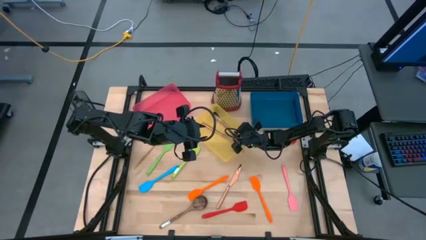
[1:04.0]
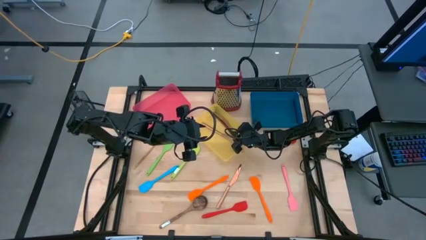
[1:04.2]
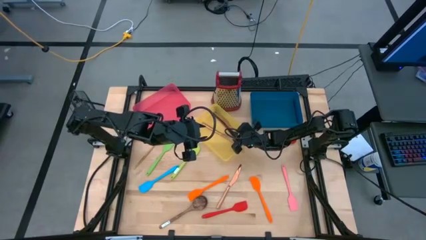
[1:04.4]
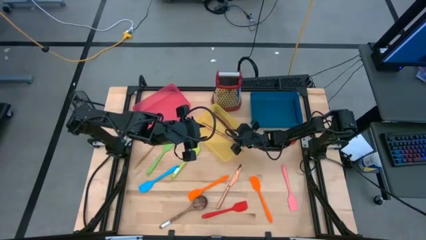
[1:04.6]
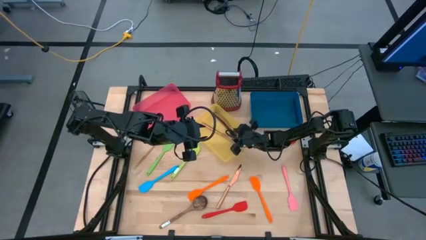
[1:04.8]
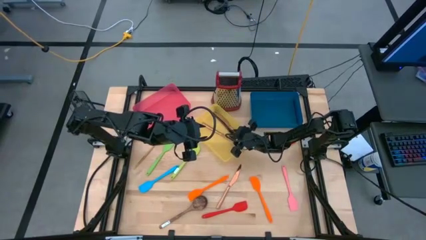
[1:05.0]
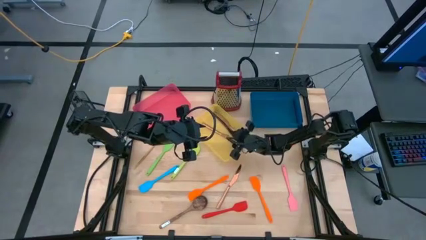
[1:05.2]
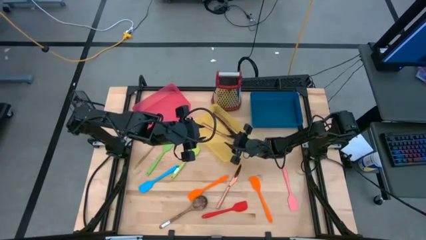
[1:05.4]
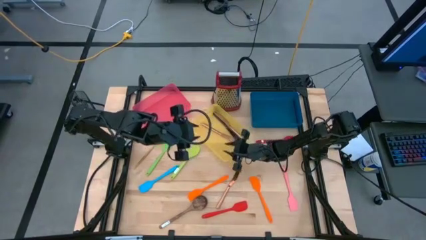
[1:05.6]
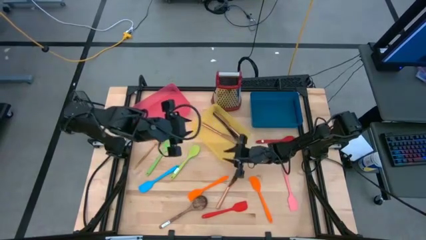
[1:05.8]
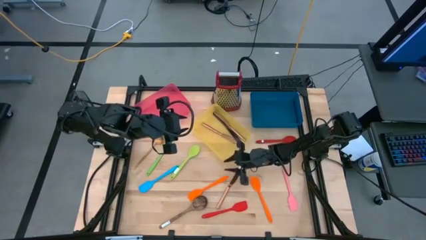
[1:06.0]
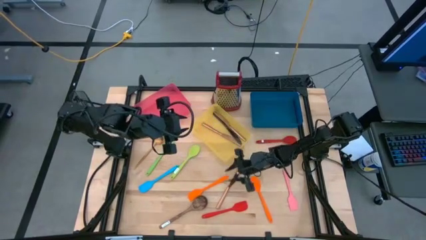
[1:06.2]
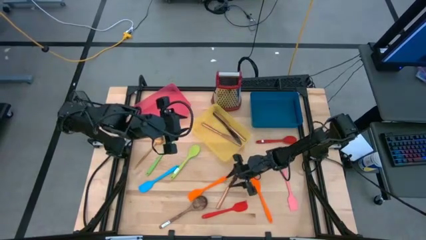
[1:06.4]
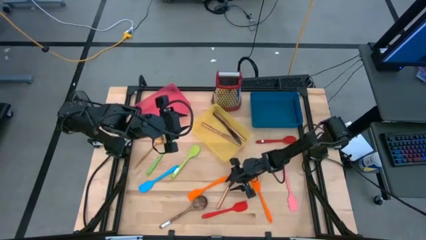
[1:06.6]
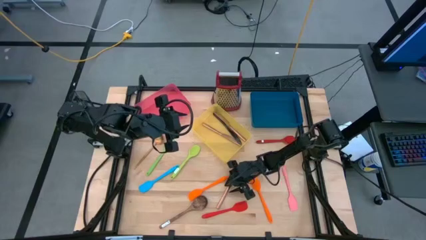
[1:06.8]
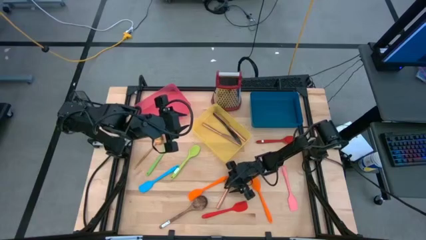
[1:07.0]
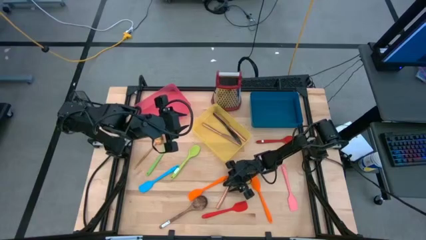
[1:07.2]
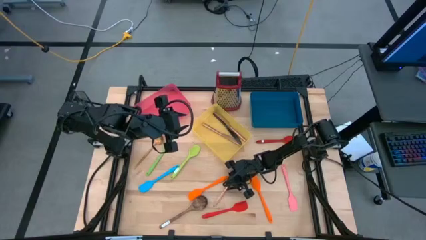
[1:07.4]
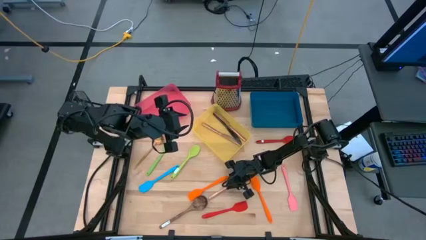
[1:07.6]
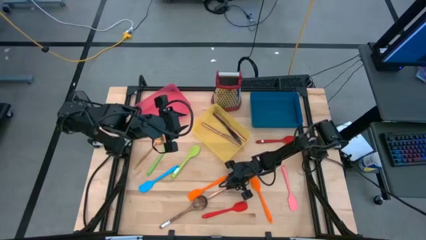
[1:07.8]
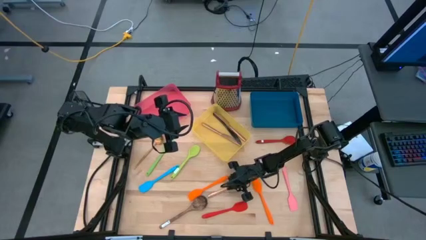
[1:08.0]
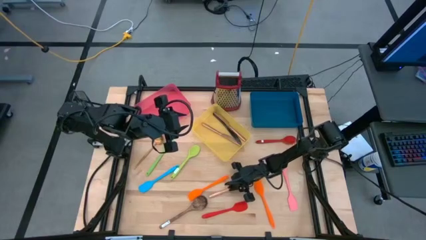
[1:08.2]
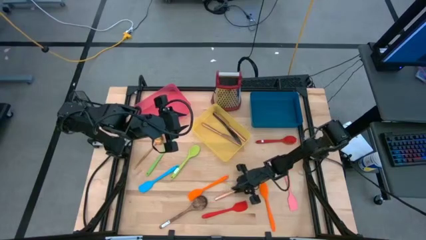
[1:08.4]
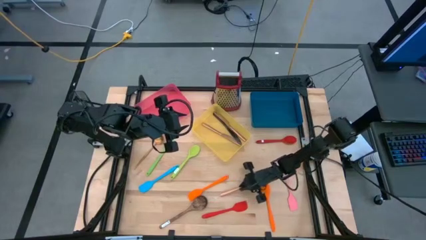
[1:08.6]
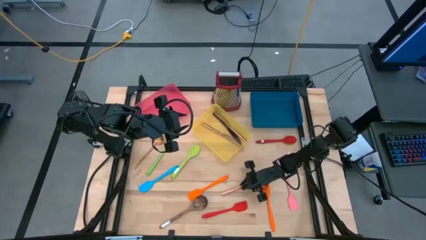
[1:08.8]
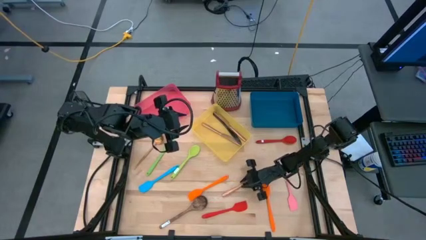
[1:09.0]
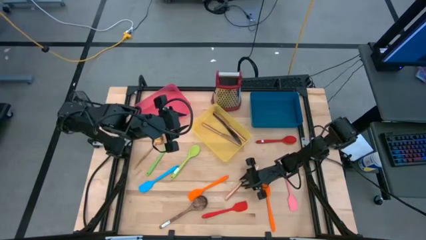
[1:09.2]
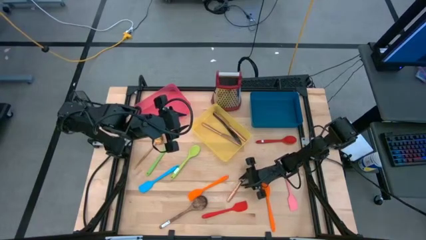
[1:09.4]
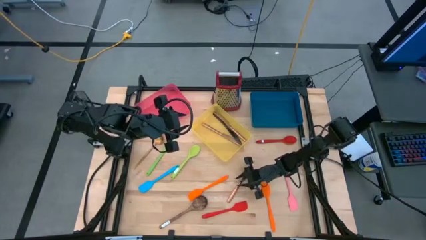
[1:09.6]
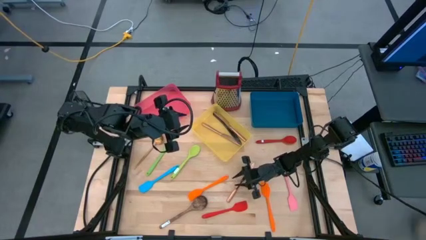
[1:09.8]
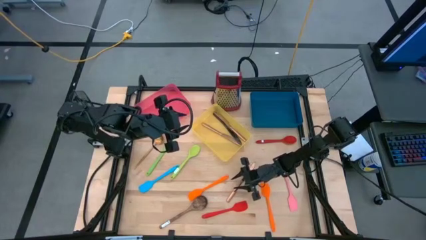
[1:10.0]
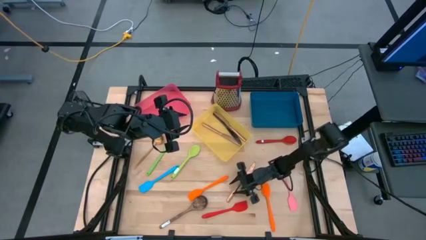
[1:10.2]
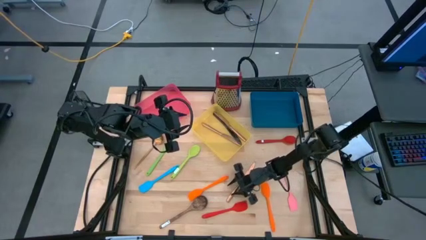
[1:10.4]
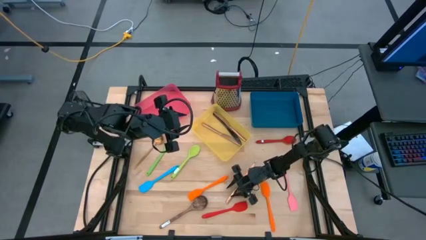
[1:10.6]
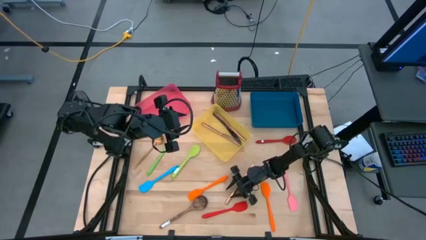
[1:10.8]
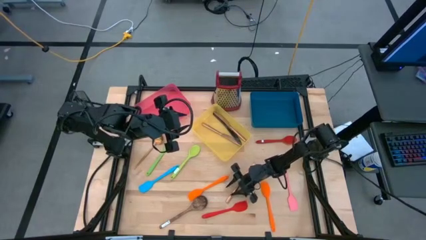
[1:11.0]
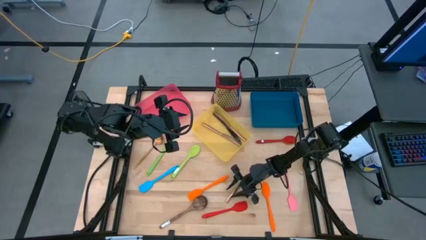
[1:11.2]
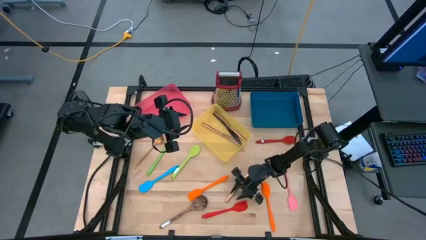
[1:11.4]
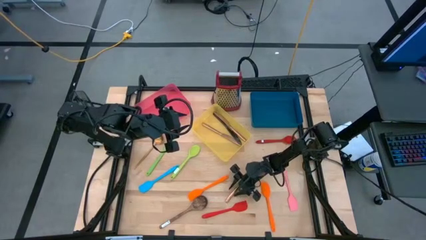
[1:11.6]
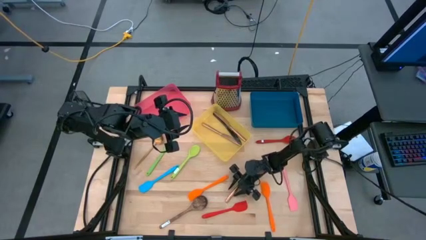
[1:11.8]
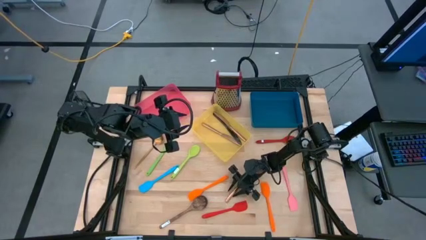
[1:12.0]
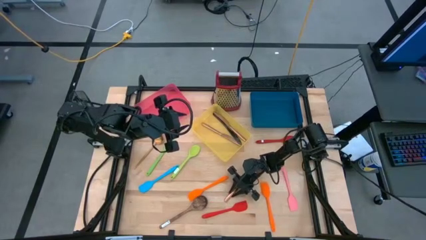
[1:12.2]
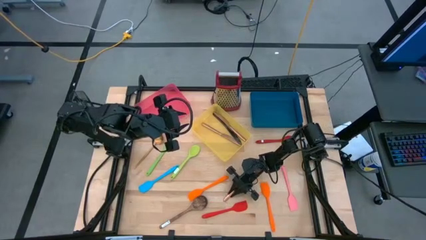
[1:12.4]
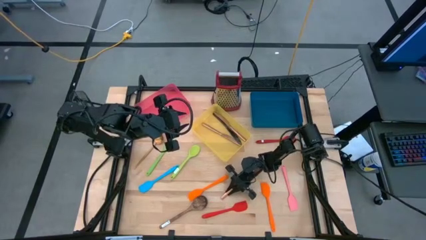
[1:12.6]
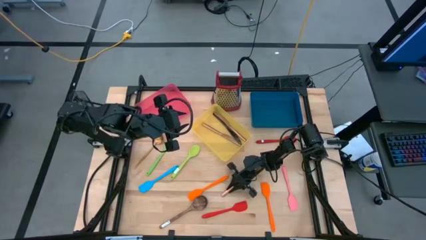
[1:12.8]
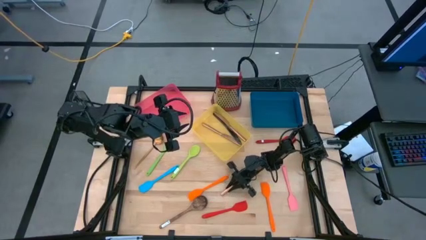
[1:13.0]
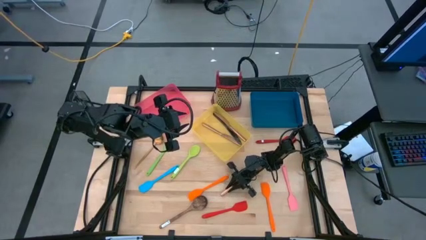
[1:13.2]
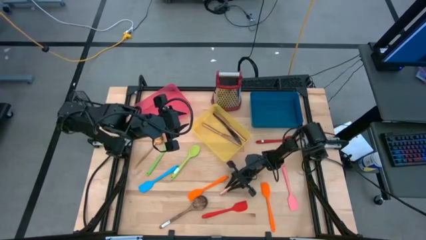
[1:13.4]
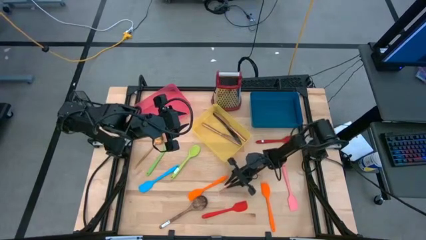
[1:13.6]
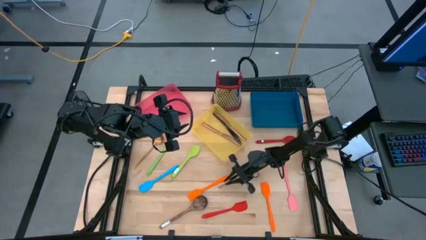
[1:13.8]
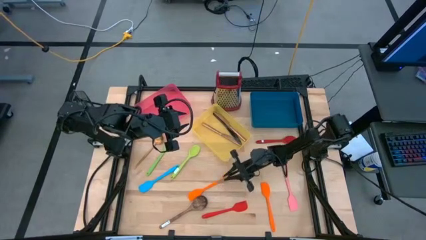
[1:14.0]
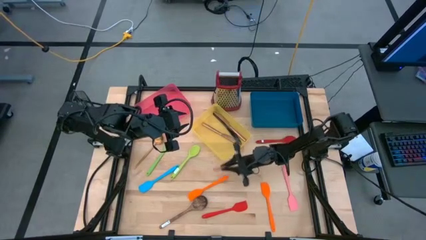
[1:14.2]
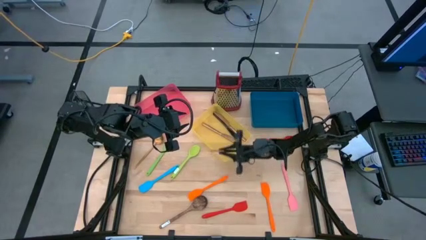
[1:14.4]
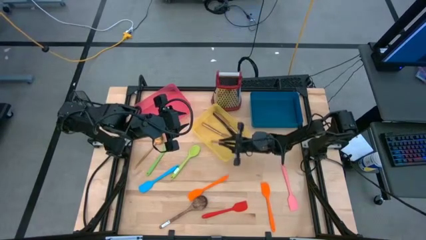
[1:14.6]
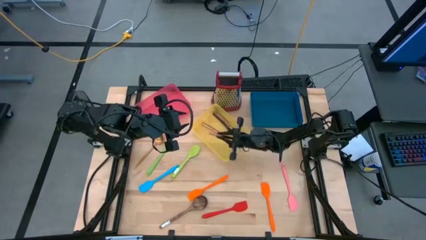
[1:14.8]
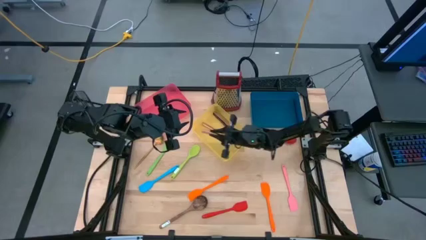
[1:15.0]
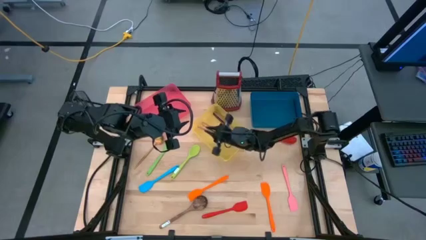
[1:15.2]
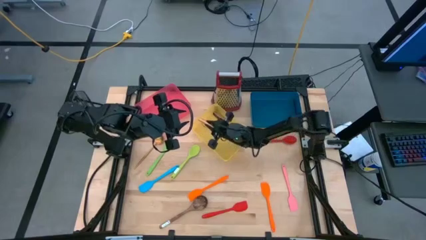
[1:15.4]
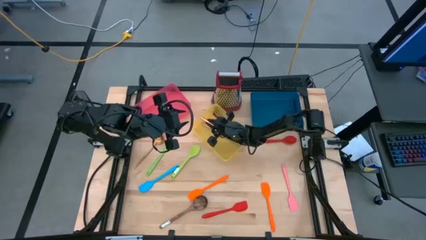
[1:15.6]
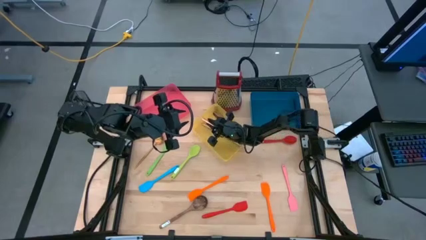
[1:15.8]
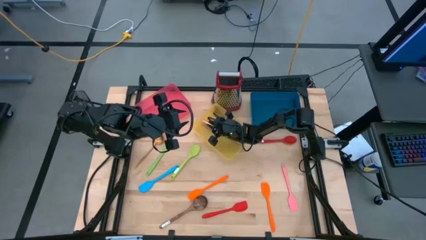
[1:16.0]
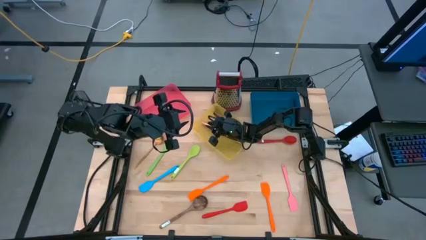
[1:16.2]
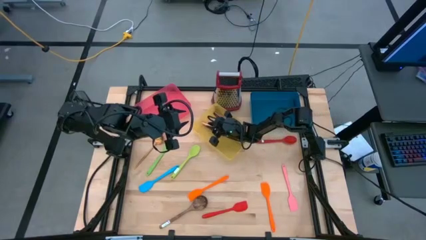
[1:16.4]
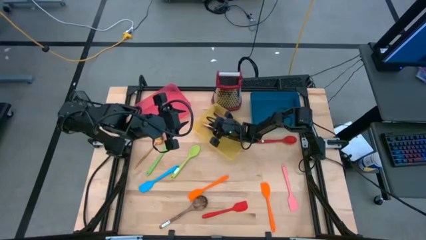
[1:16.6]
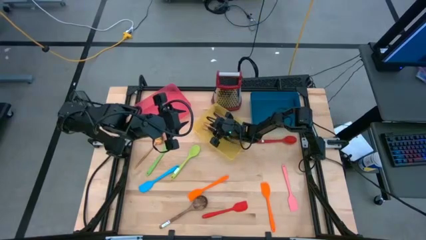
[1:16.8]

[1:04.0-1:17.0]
Task: Pick & Place Kitchen Items
Put the brown table knife into the yellow bin
